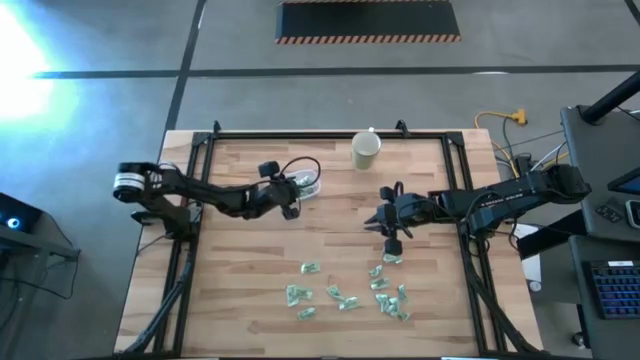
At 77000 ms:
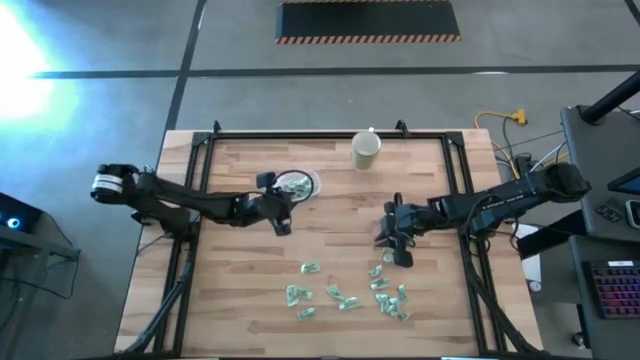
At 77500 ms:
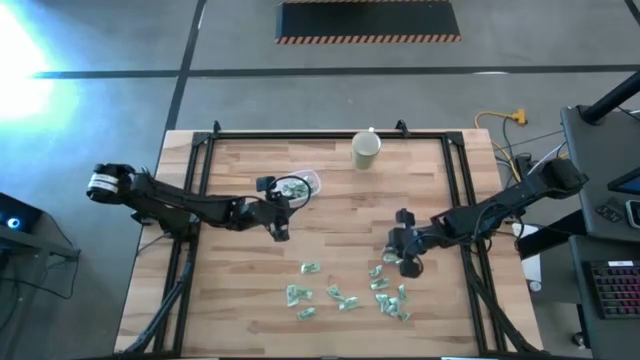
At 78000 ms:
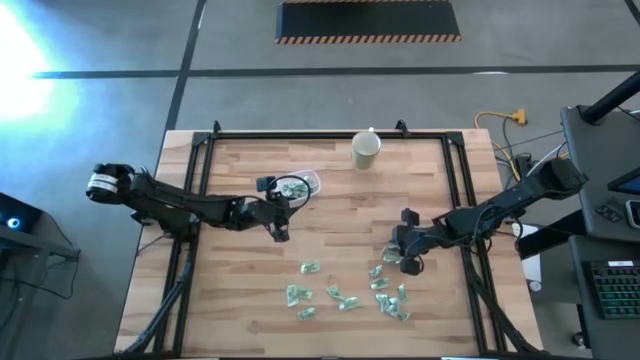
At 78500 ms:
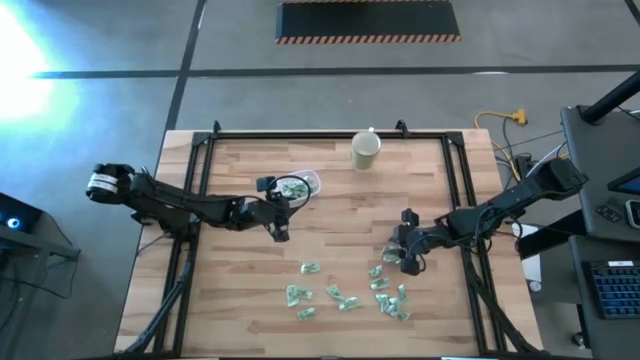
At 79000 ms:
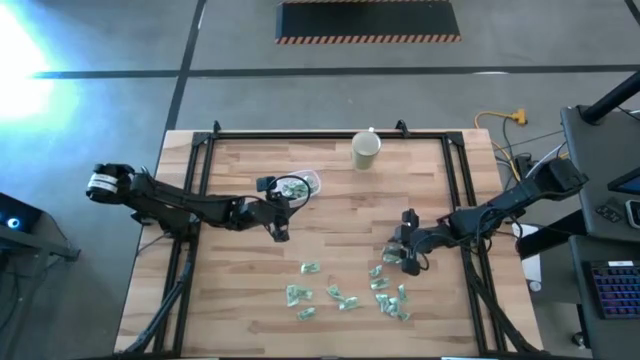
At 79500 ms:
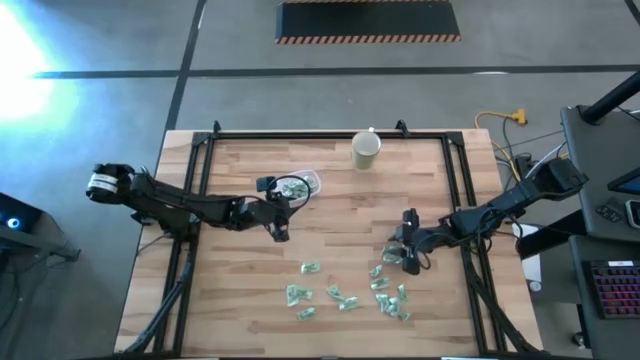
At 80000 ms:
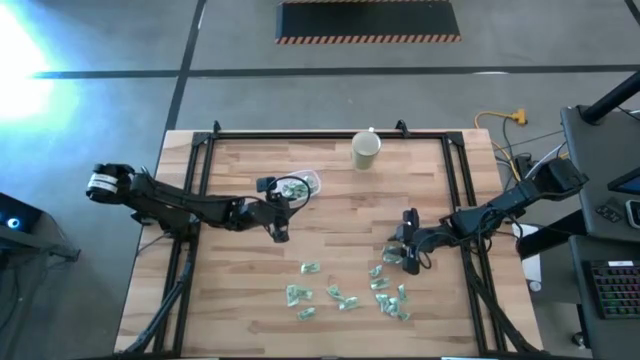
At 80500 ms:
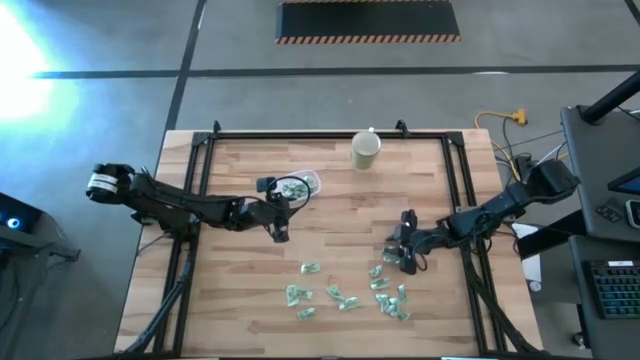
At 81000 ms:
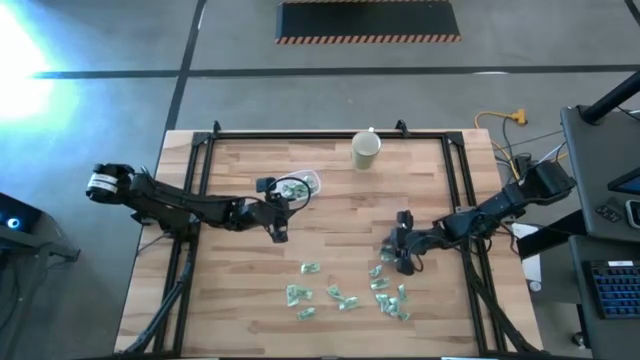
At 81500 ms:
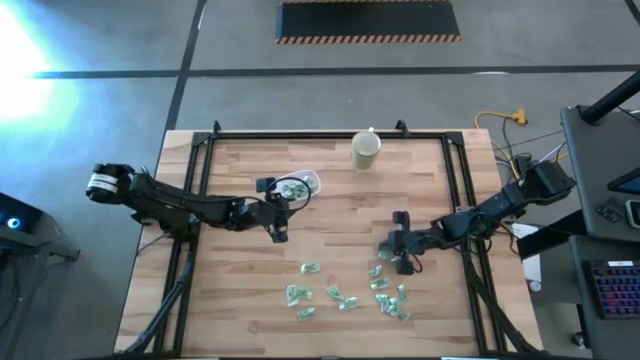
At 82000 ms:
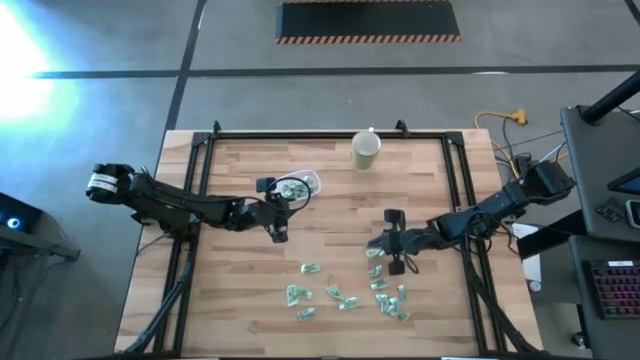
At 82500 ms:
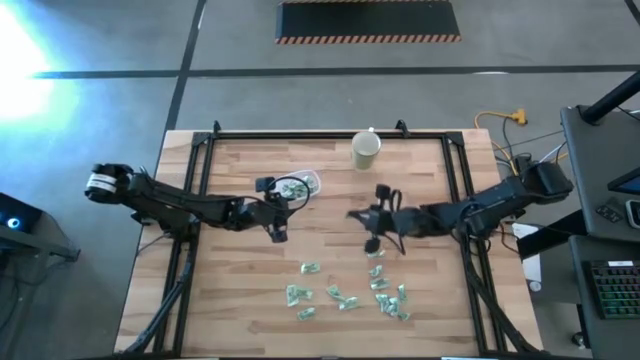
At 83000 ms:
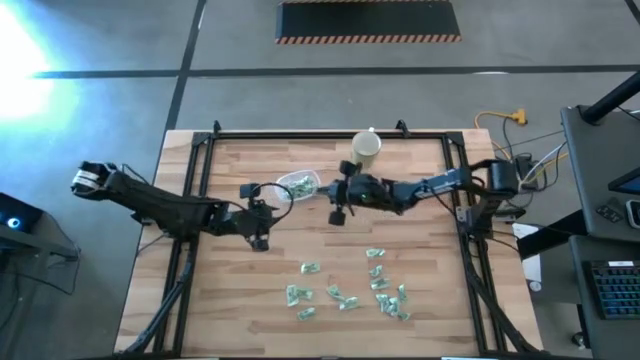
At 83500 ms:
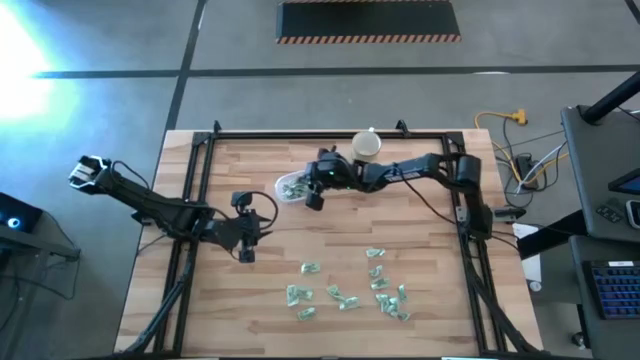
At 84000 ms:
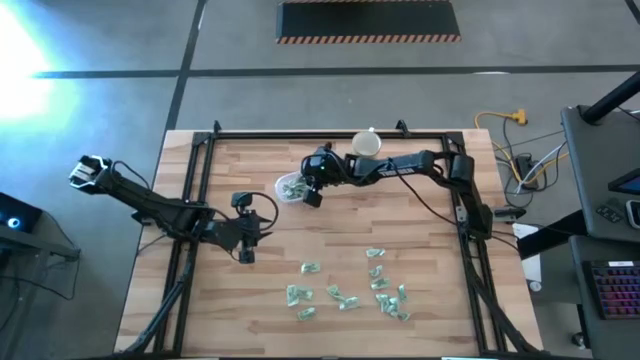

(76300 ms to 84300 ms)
Task: Pick and place Stevia / Truvia into bins
Put the stevia packet into the transparent container

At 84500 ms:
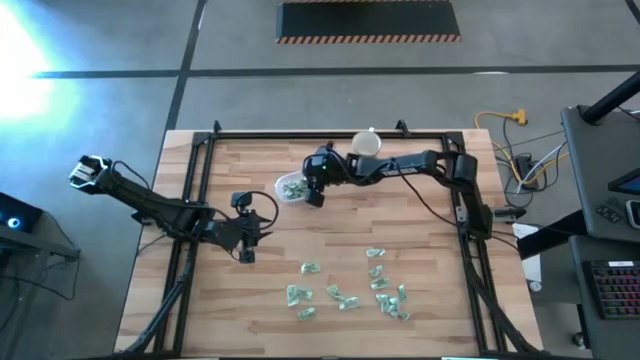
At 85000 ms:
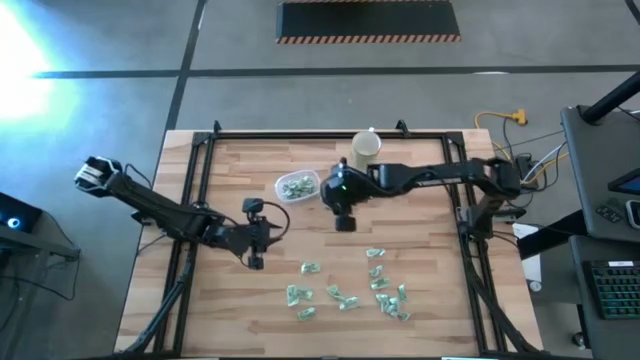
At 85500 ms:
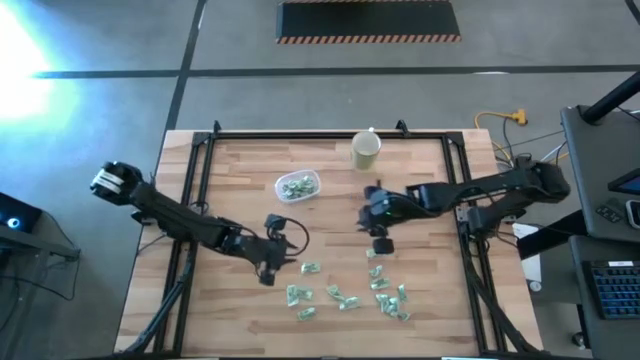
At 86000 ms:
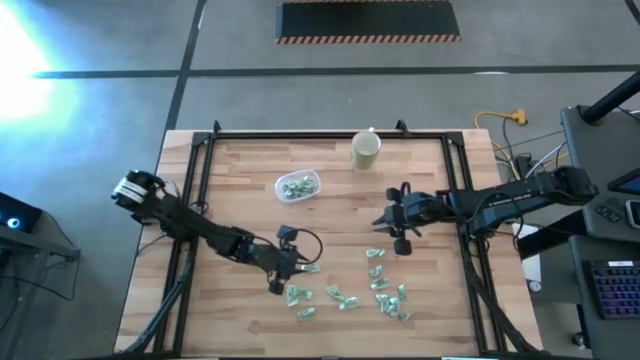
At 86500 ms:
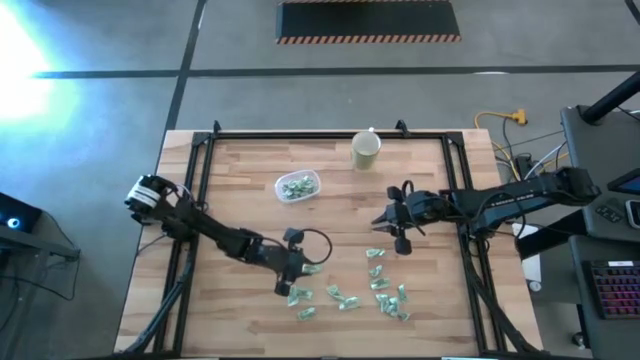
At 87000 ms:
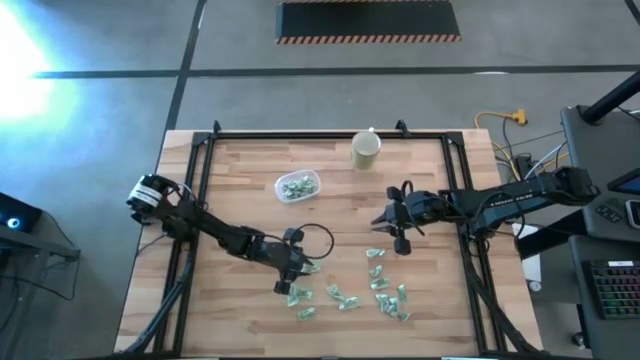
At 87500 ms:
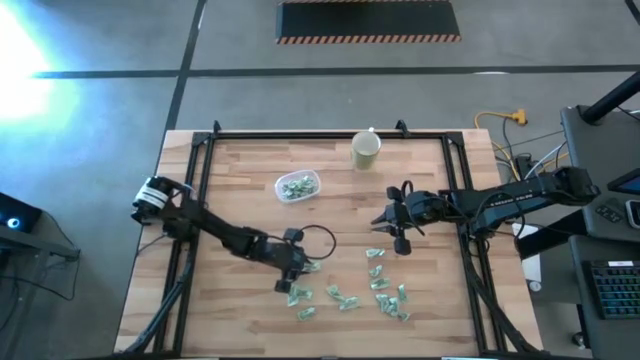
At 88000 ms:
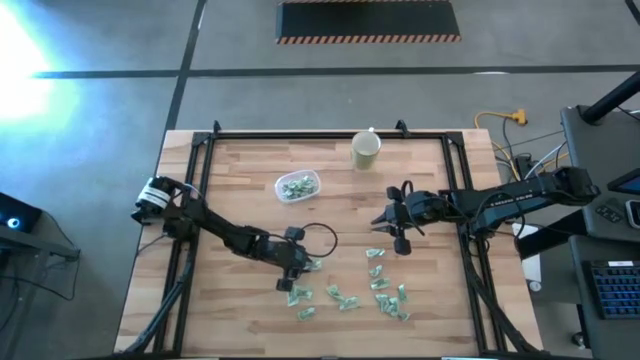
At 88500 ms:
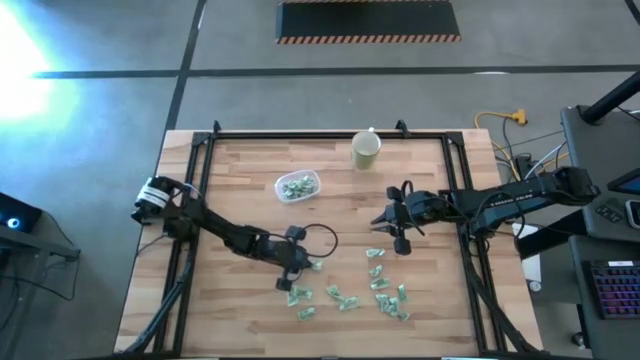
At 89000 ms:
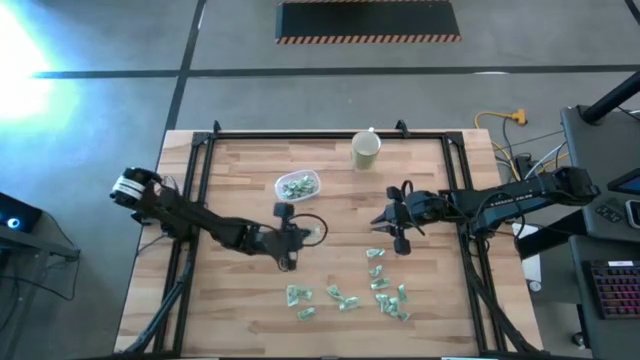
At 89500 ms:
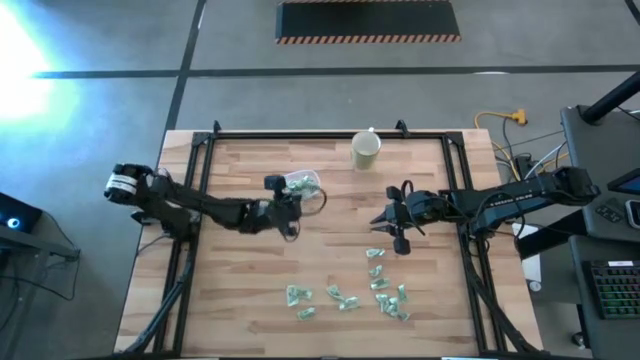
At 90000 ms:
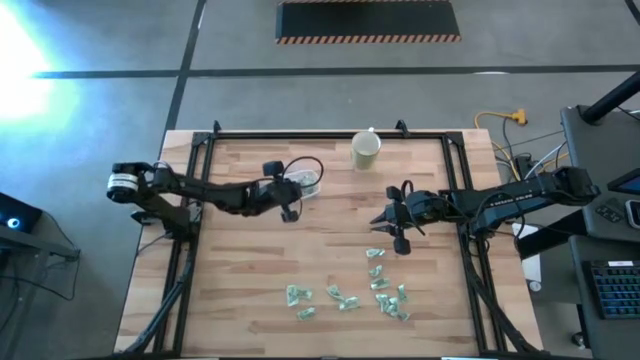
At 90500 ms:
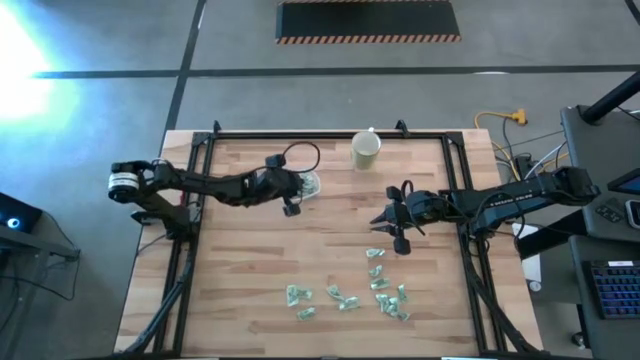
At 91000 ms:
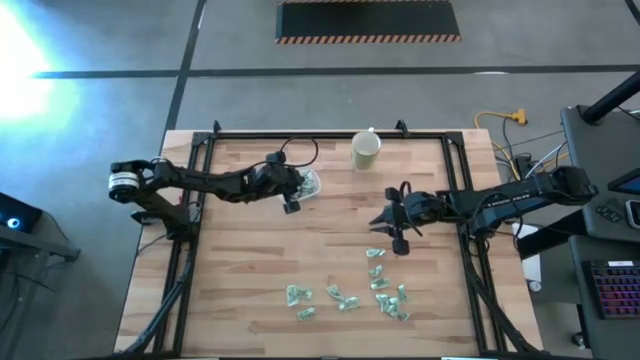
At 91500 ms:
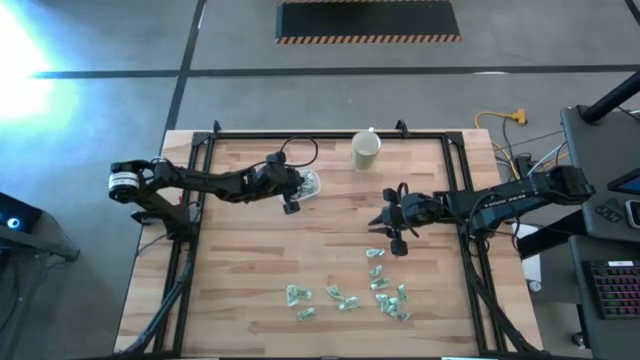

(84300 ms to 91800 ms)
Put the stevia packet into the transparent container

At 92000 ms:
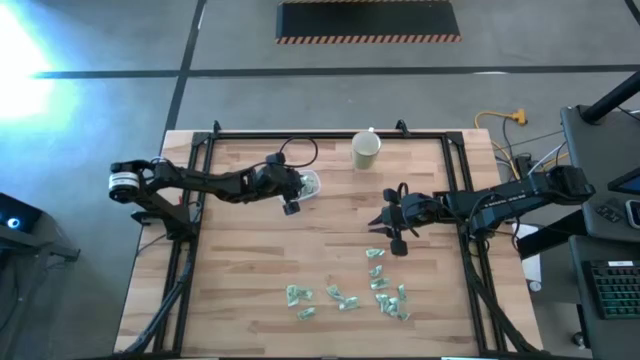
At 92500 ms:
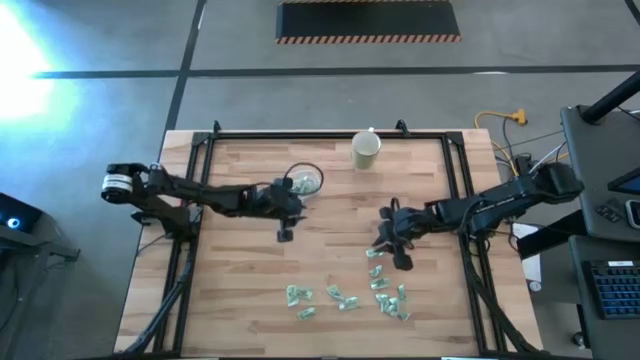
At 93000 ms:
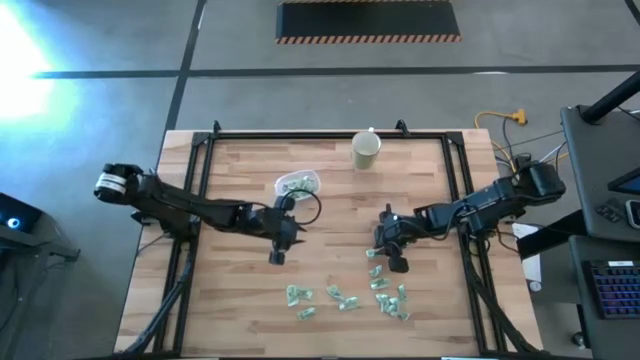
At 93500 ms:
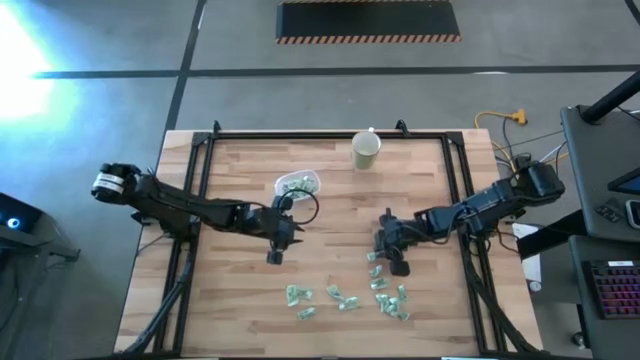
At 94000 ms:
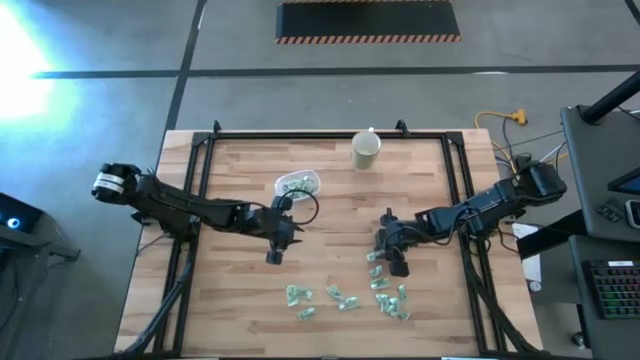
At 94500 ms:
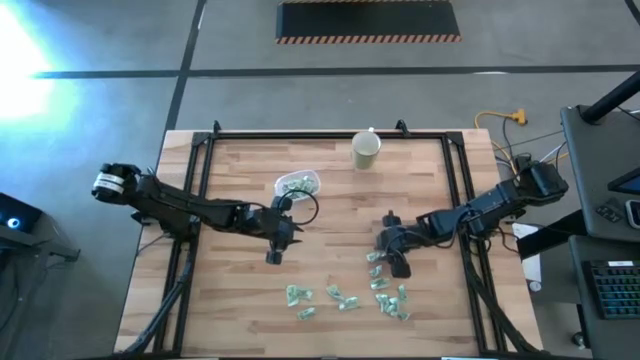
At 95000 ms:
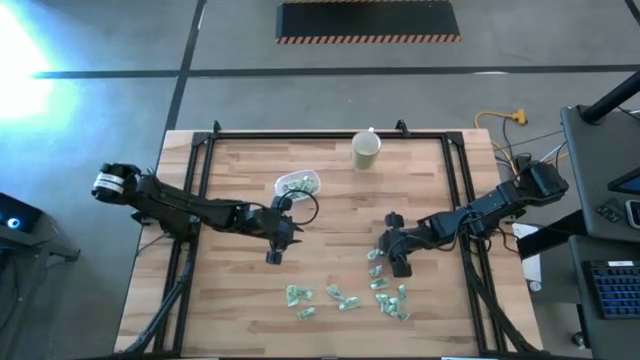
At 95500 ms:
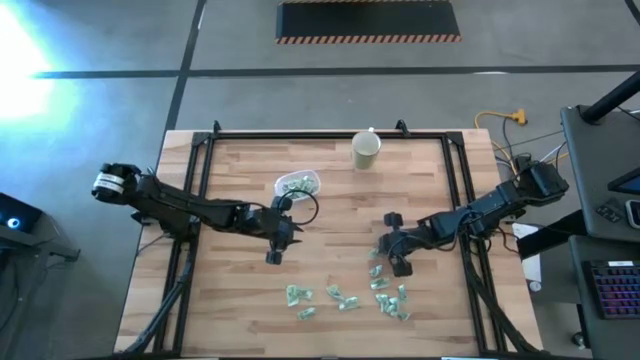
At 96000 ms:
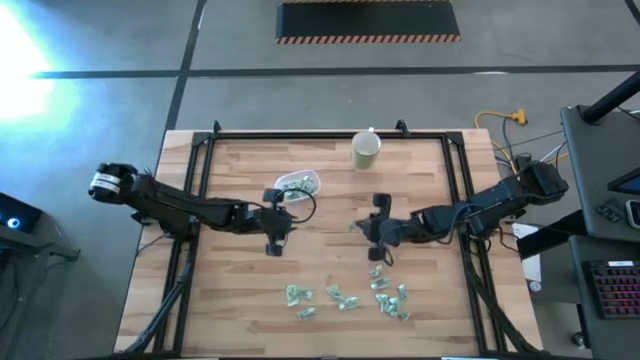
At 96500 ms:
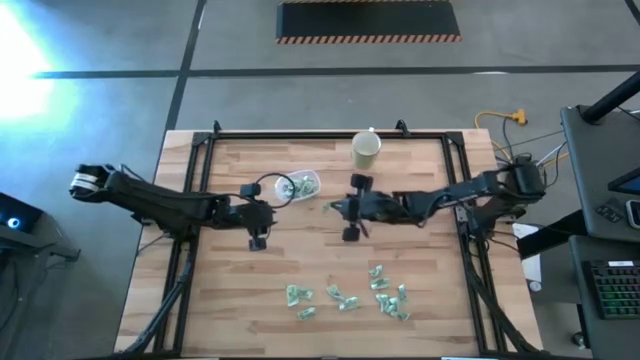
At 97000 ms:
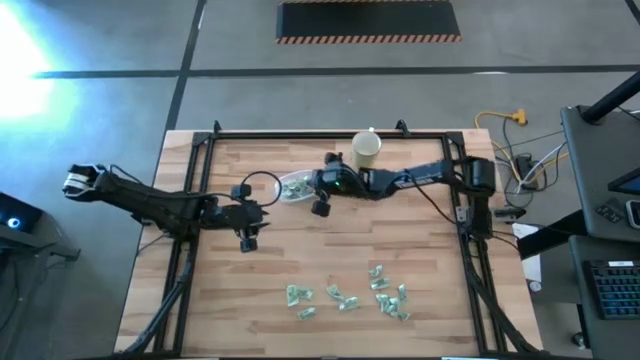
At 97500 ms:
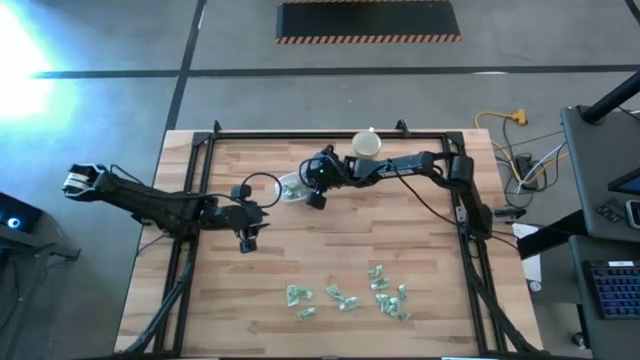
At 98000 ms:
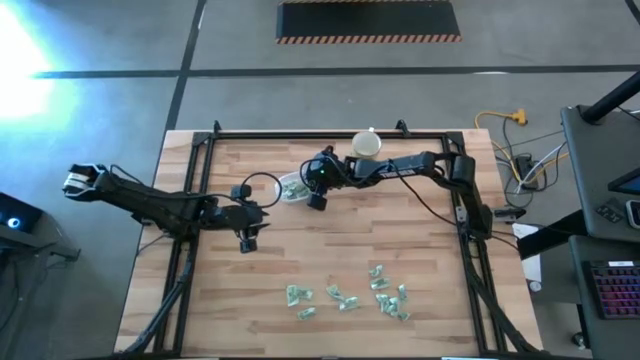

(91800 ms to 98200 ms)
Put the stevia packet into the transparent container
